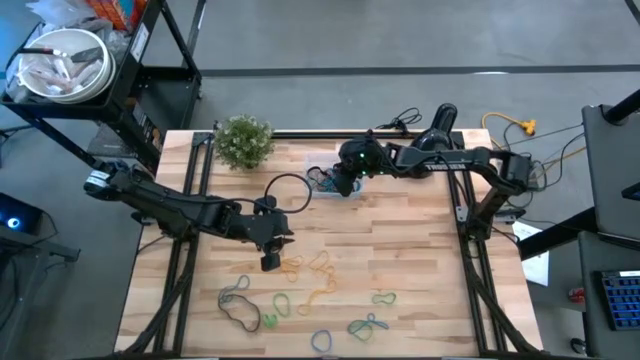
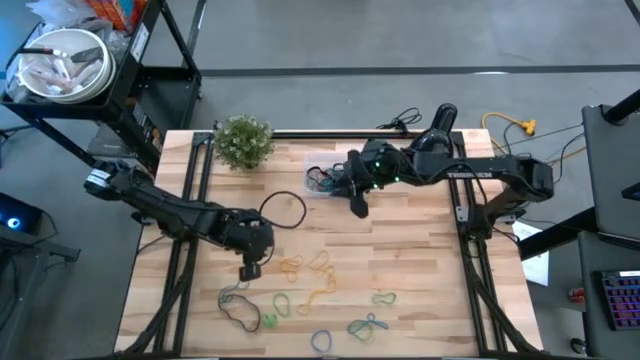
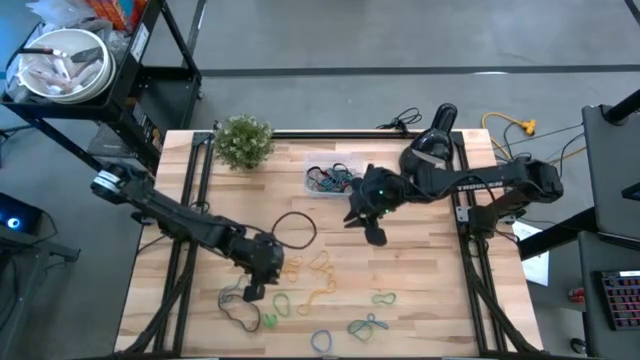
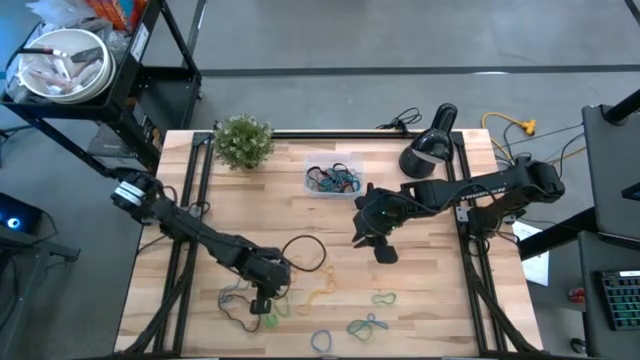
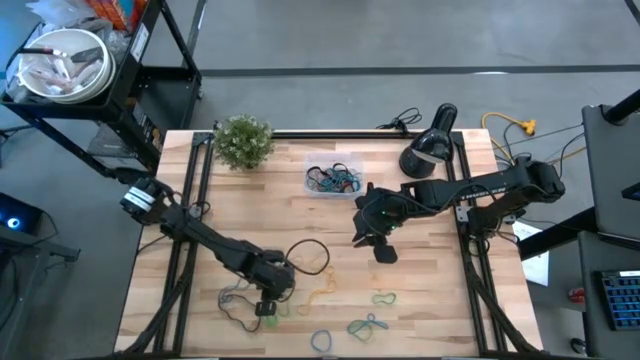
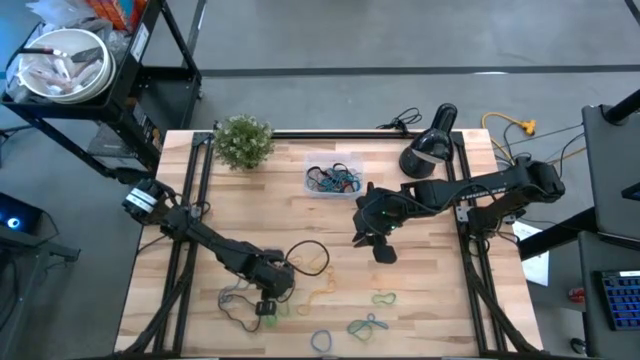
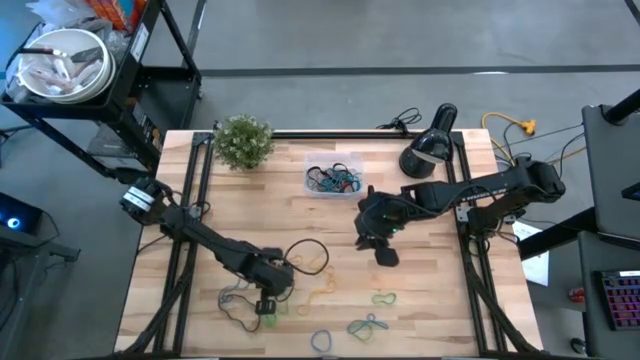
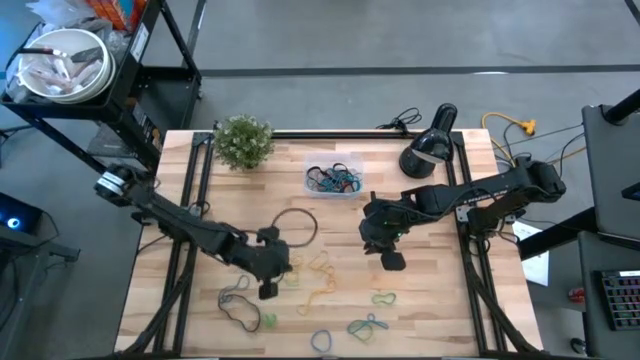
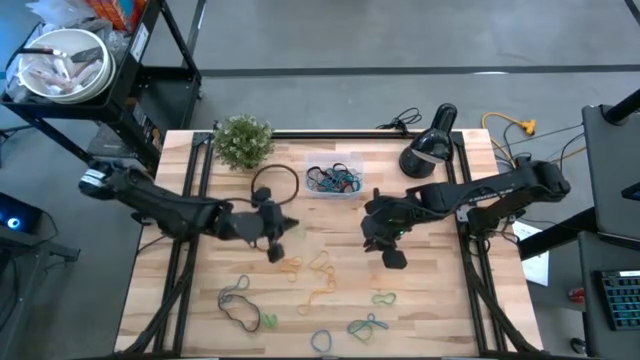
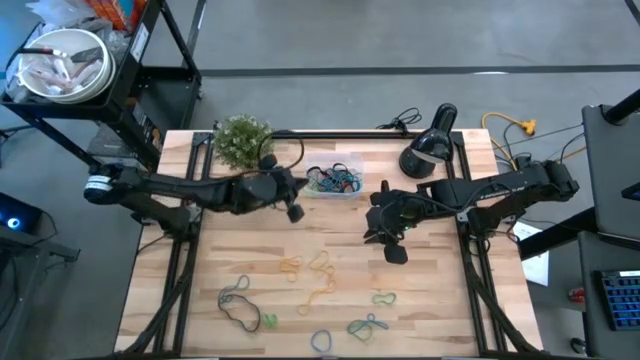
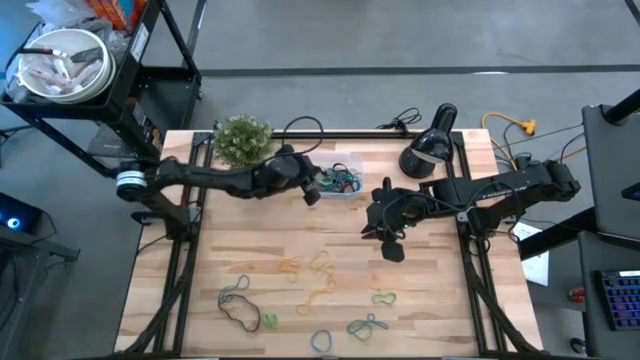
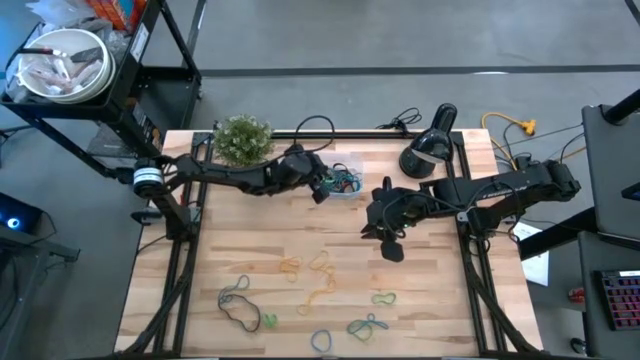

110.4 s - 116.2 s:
Task: Pick and place rubber bands into bin
Put the green rubberband into the transparent bin

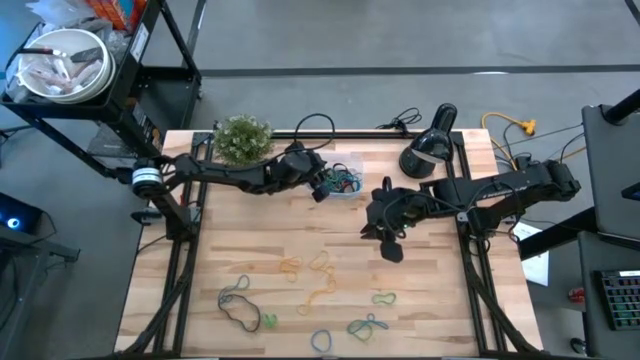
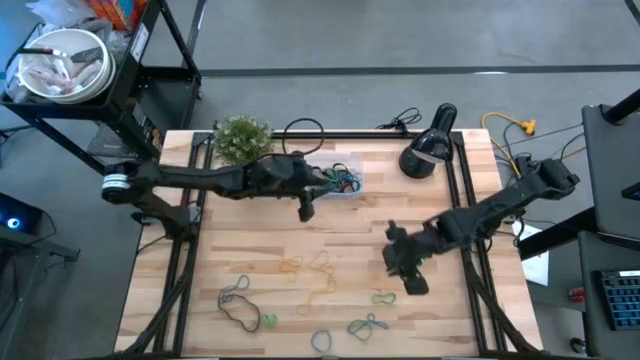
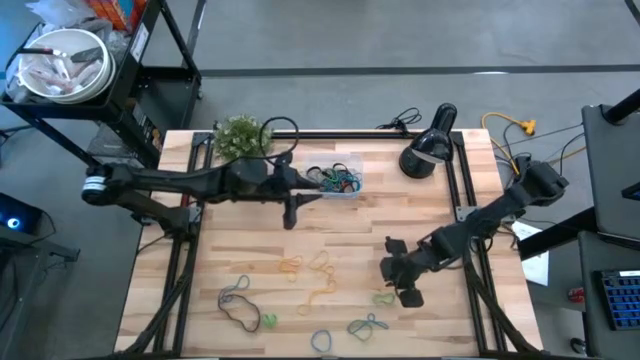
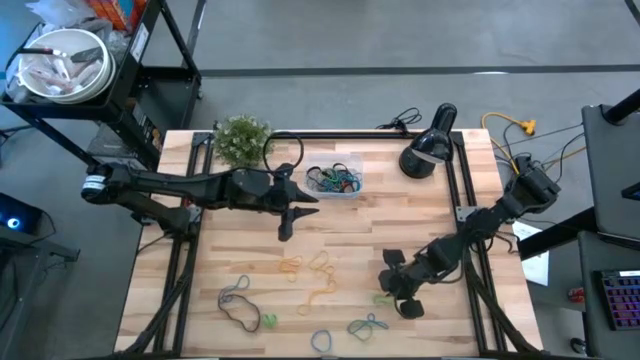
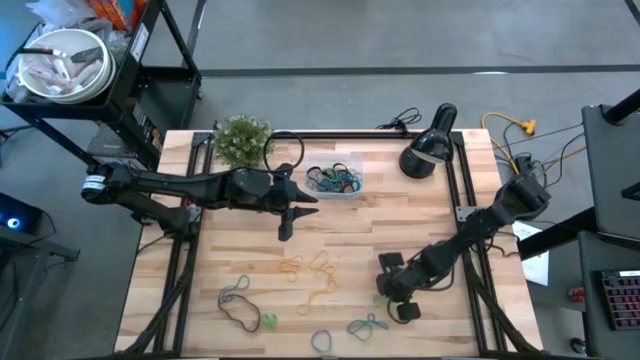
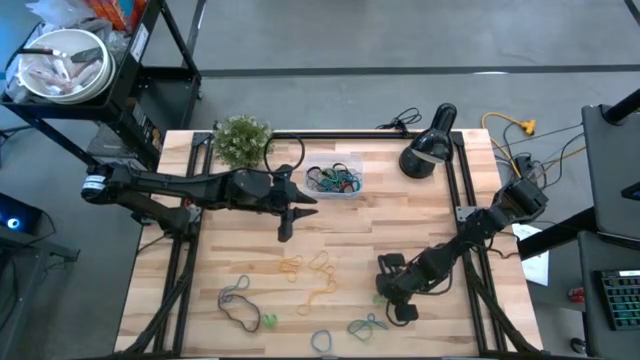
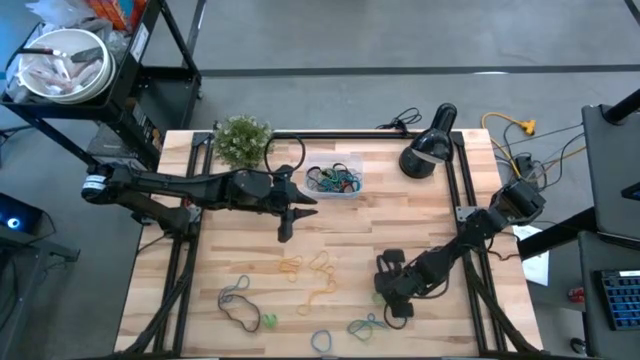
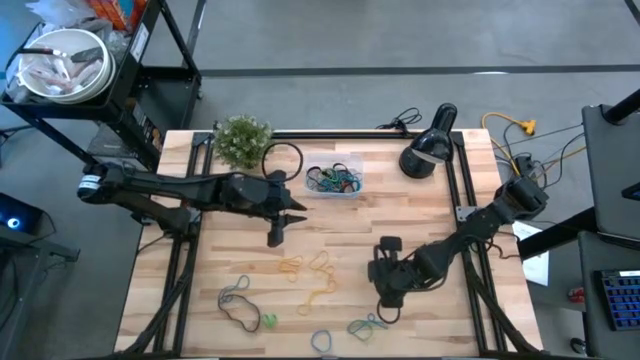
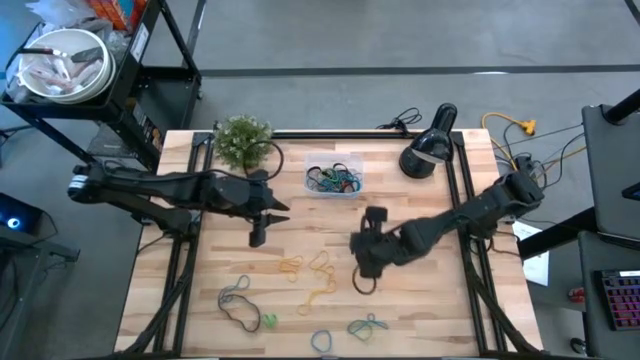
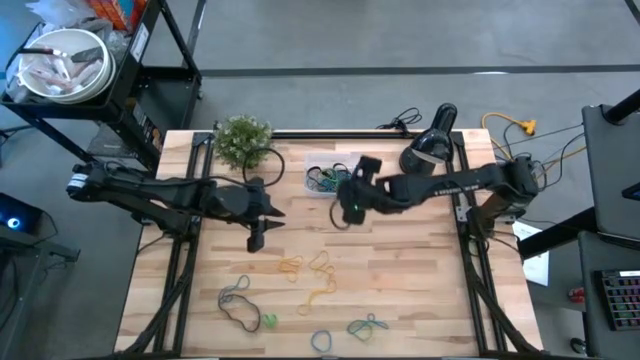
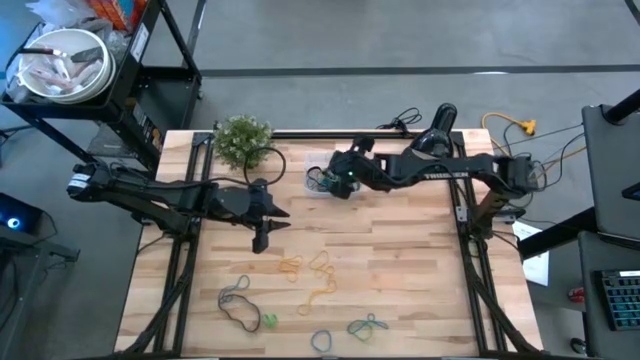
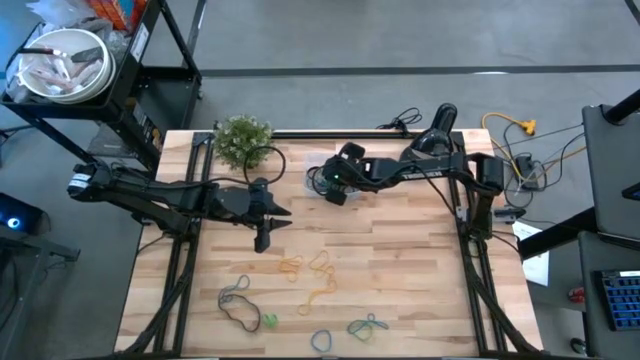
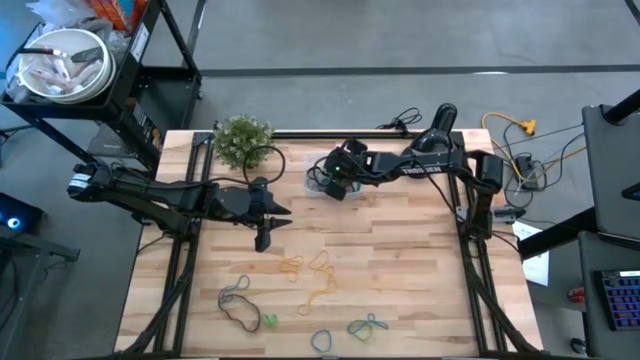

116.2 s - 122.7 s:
Put the green rubberband into the transparent bin

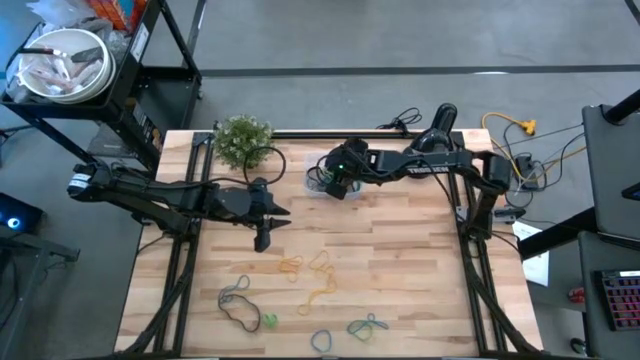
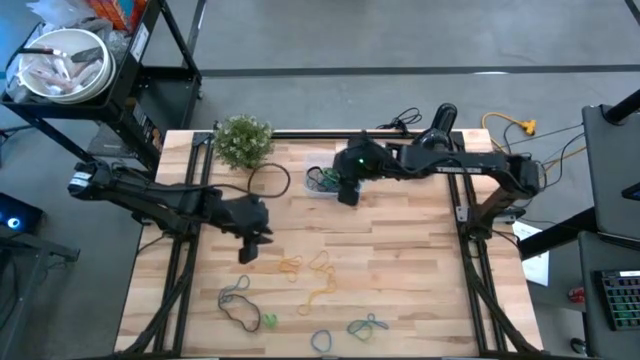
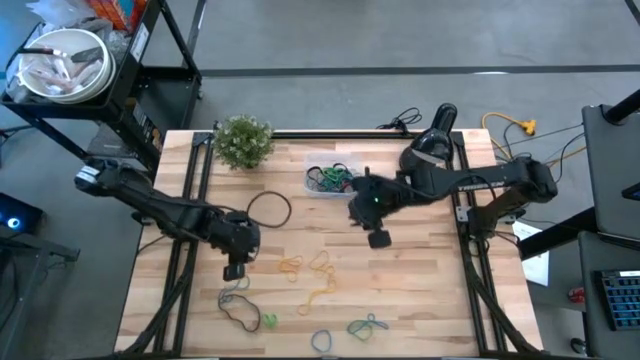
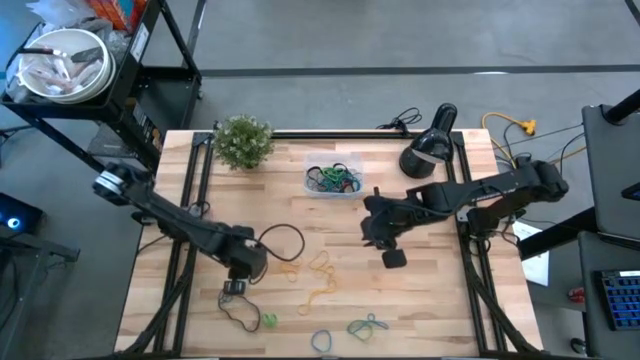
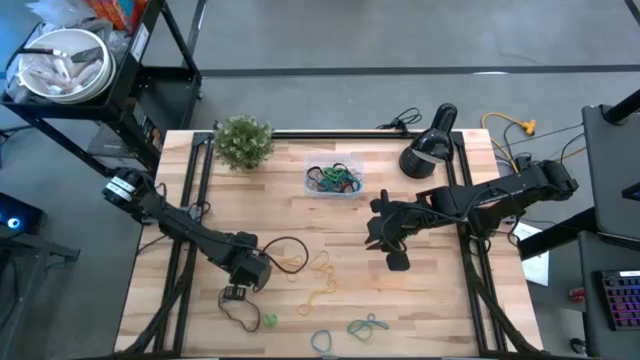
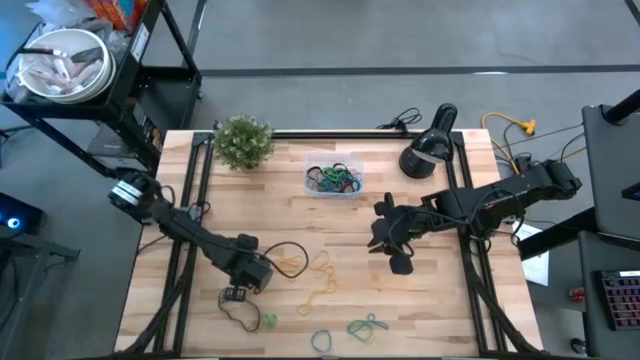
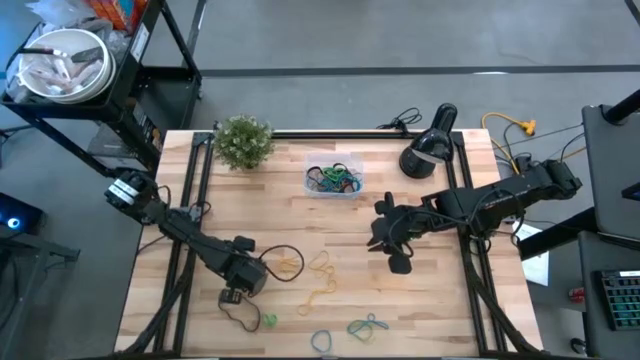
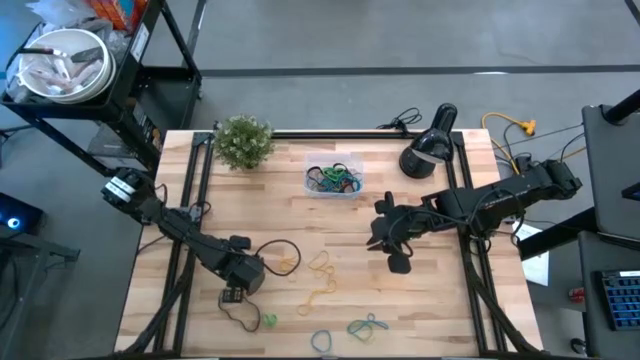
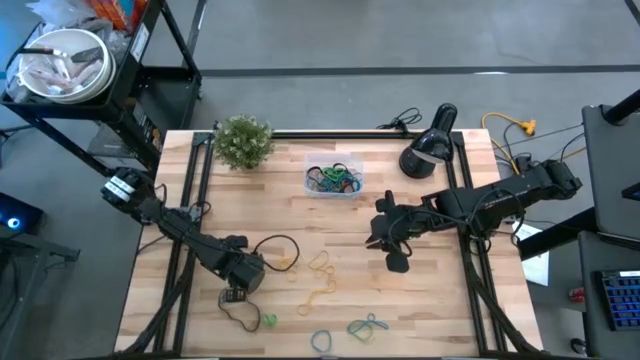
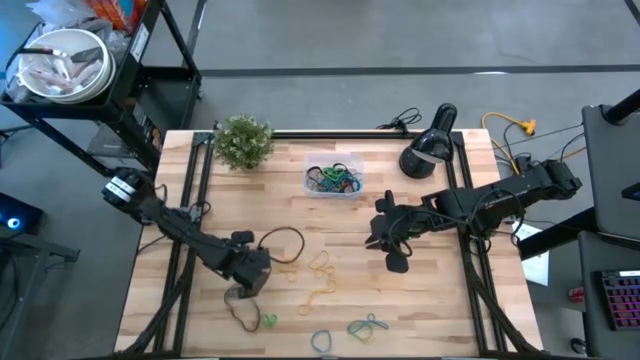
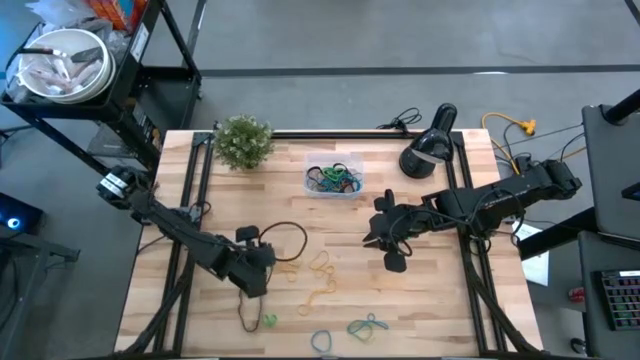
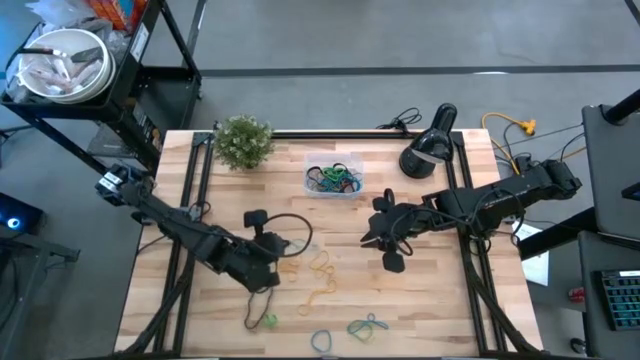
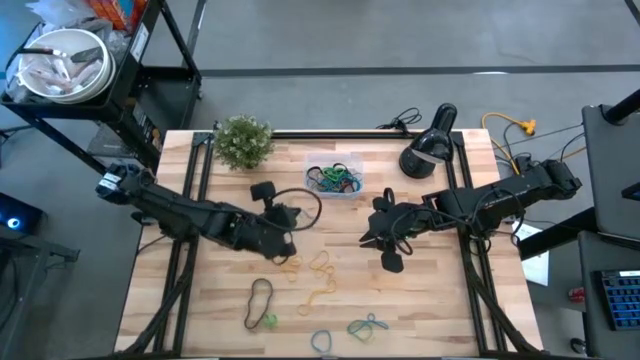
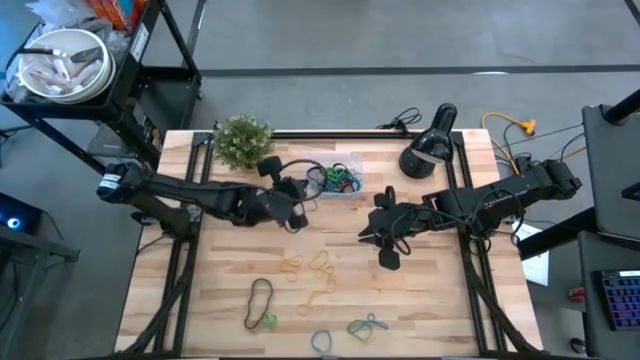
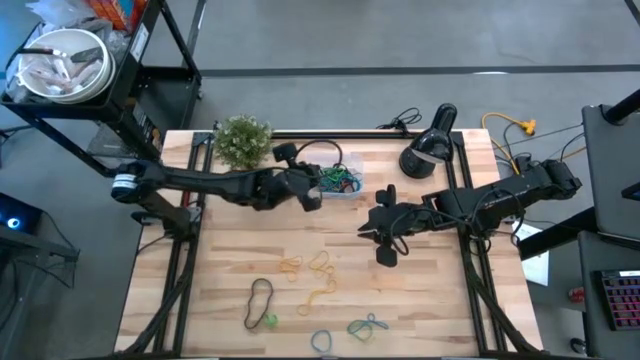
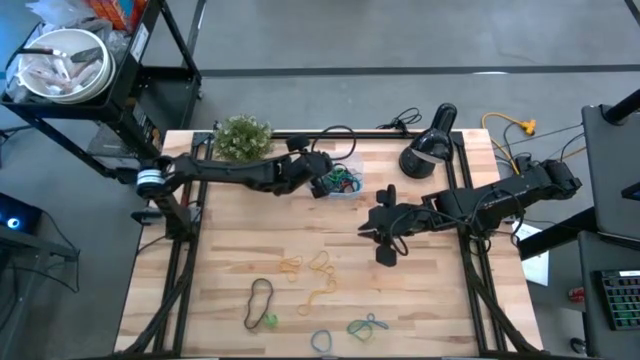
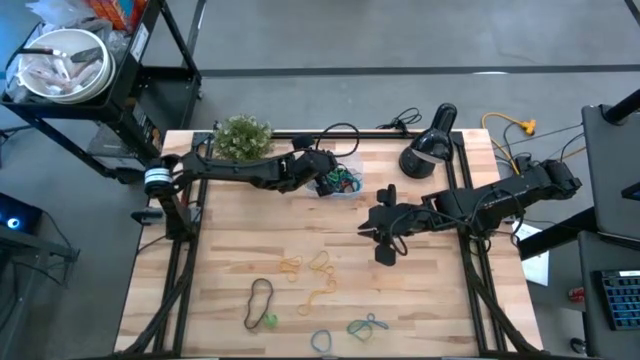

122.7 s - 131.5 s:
Put the blue rubberband into the transparent bin

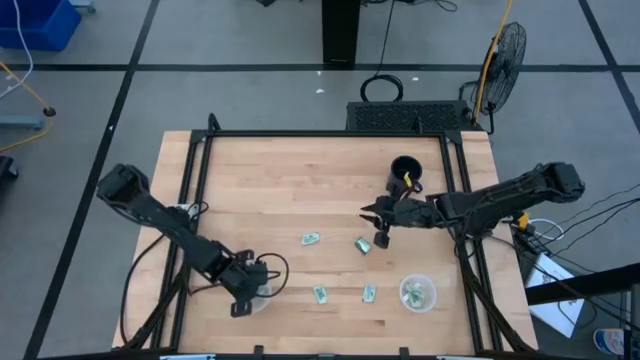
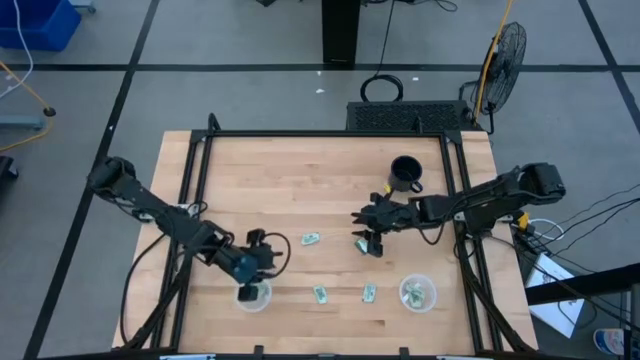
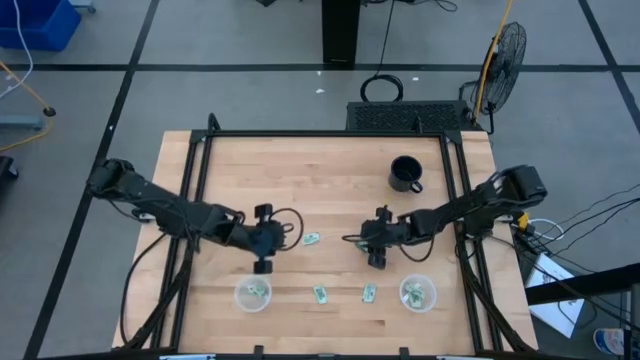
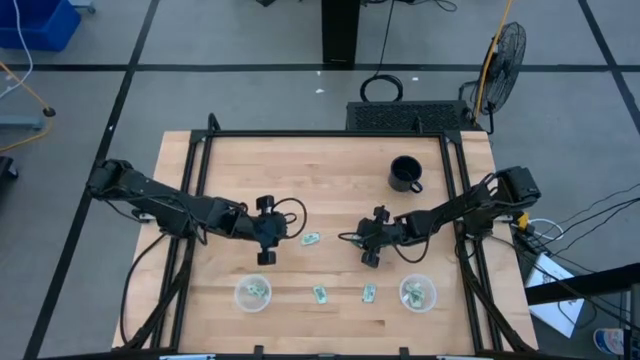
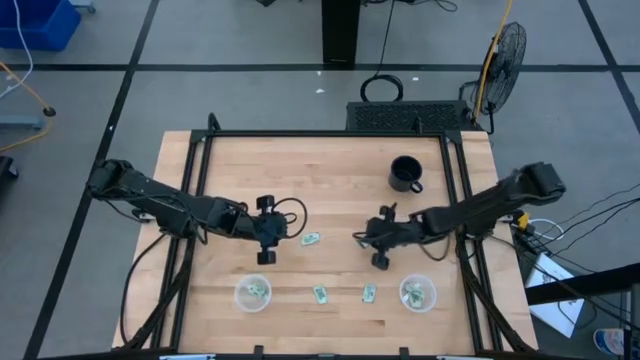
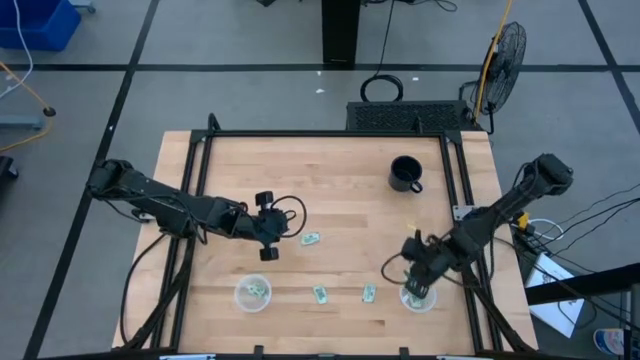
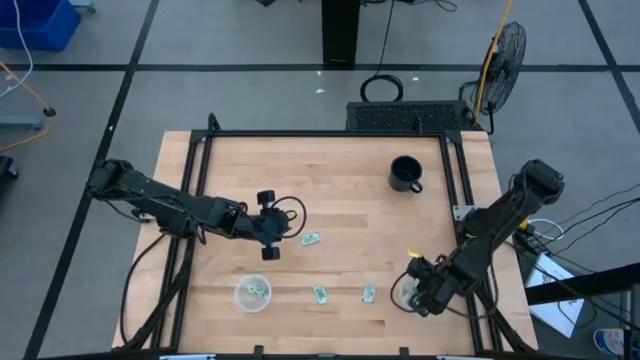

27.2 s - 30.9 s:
Task: Pick and place Stevia / Truvia into bins
Put the truvia packet into the right transparent container
